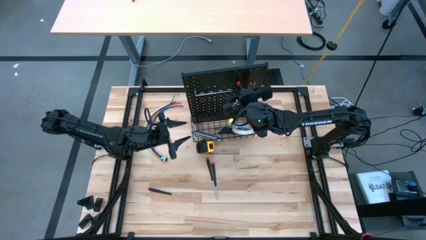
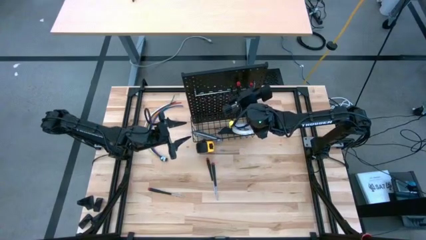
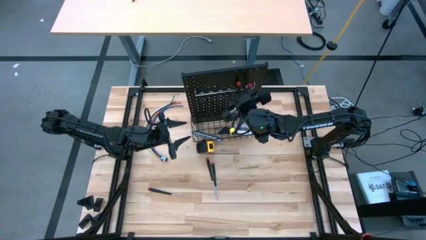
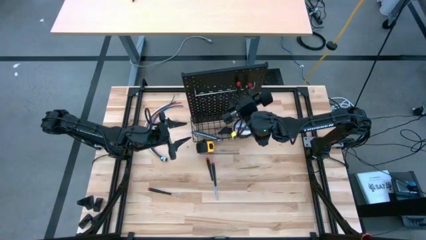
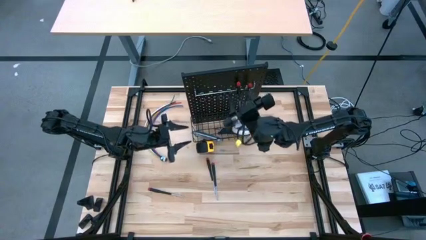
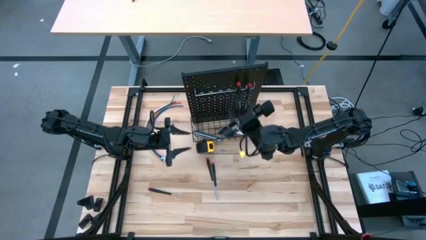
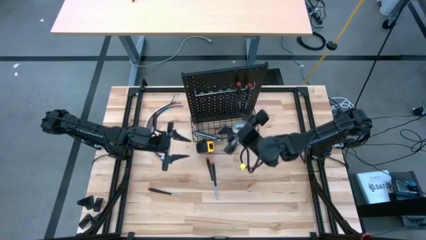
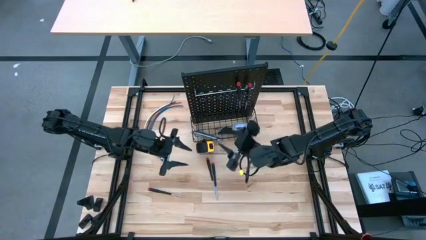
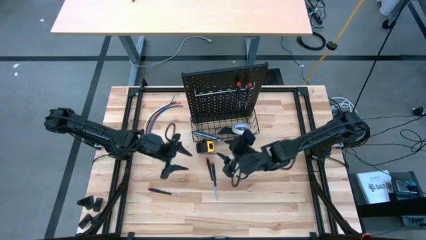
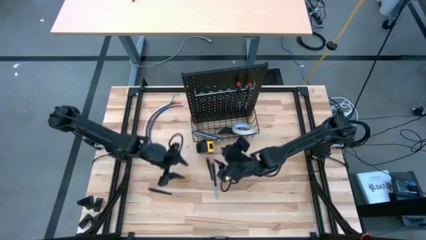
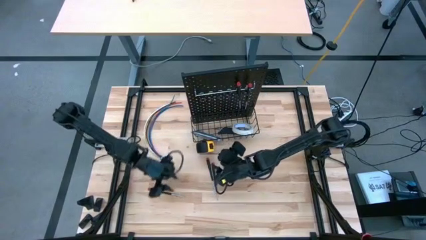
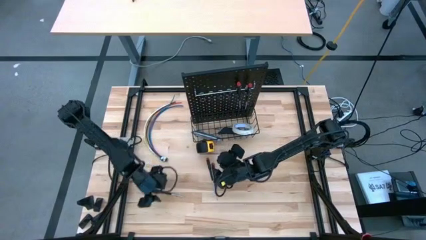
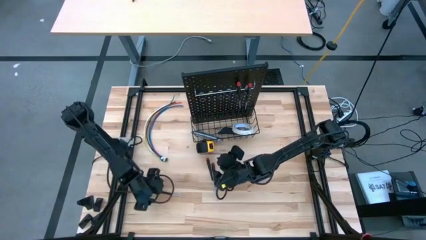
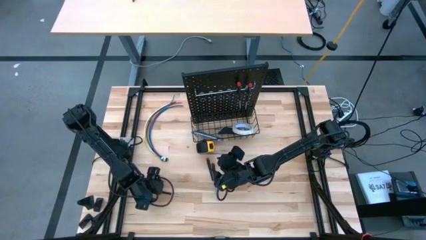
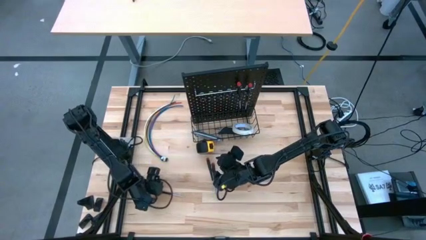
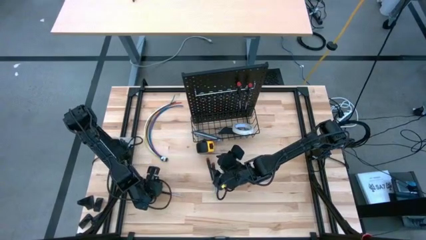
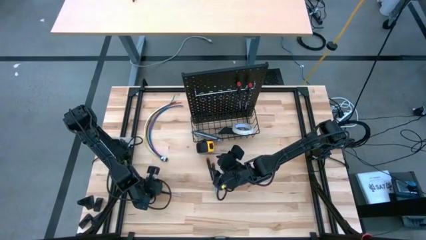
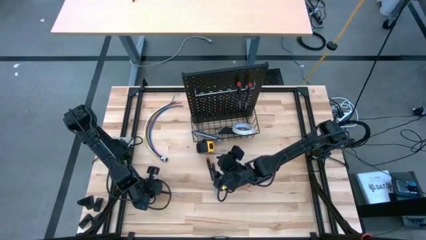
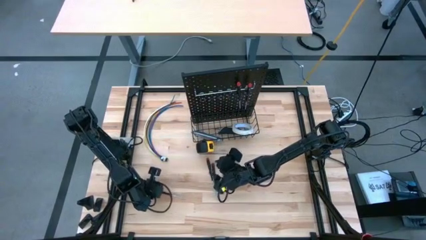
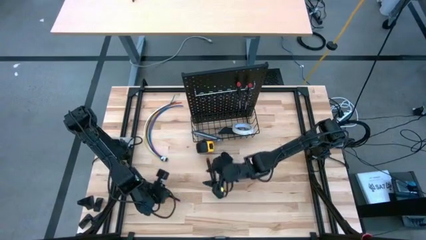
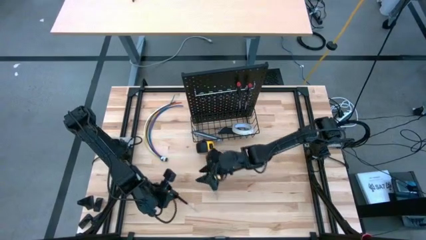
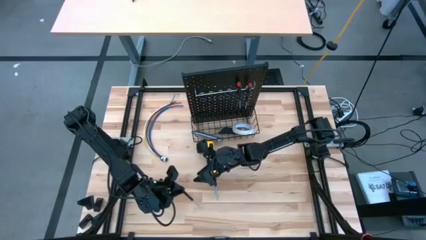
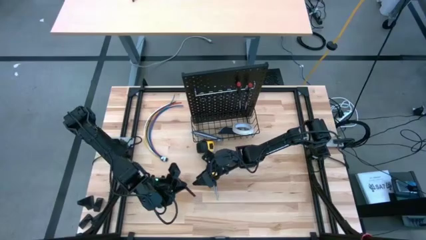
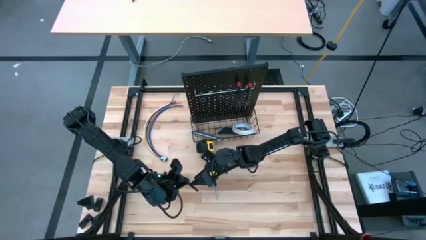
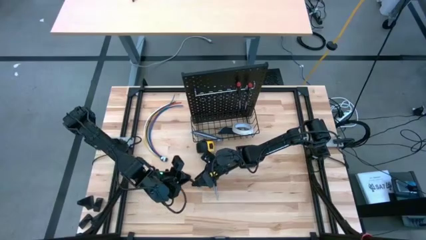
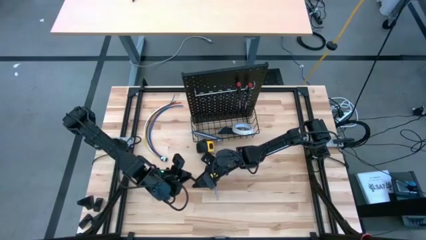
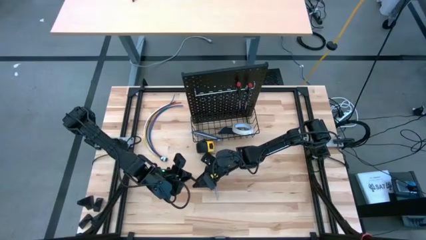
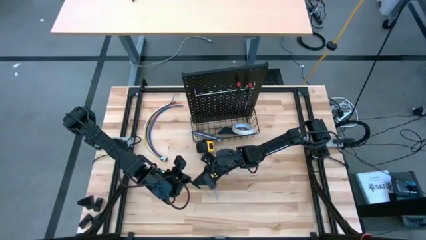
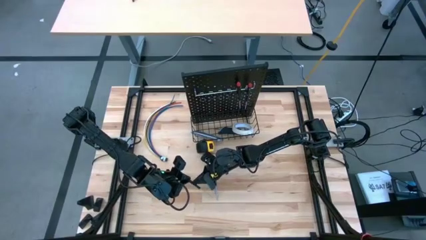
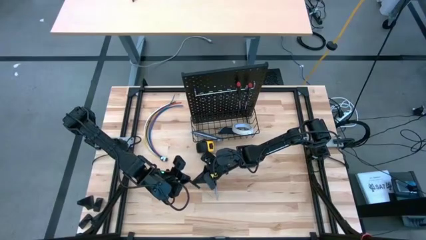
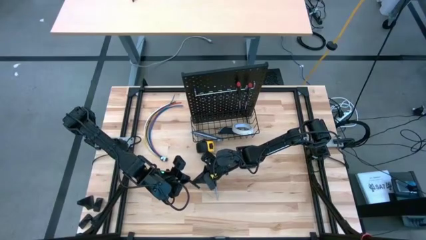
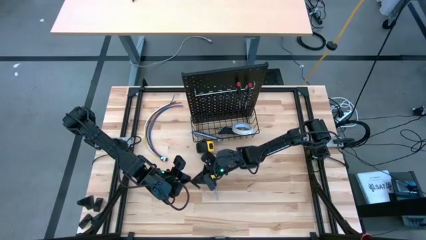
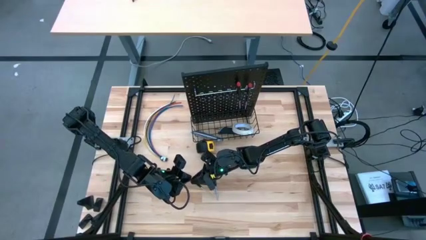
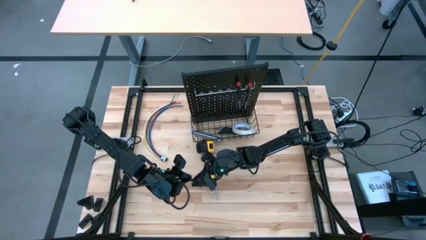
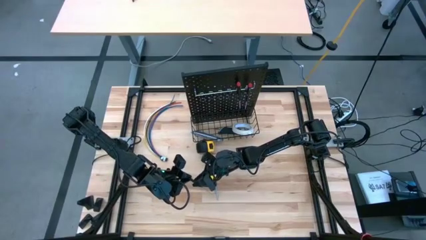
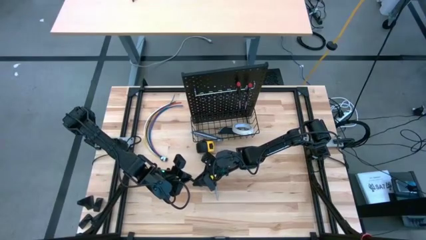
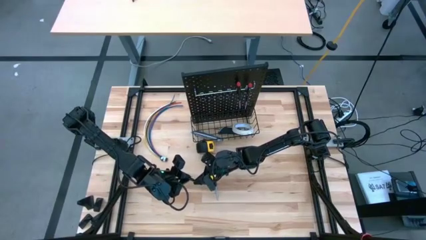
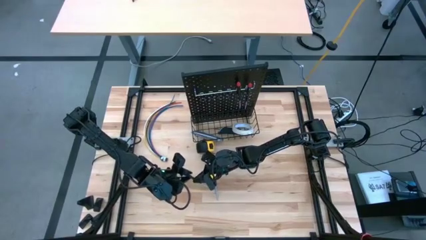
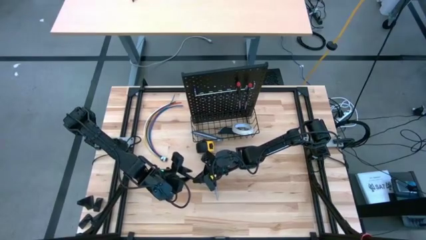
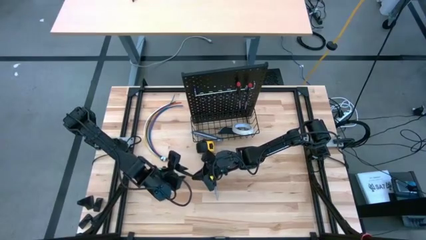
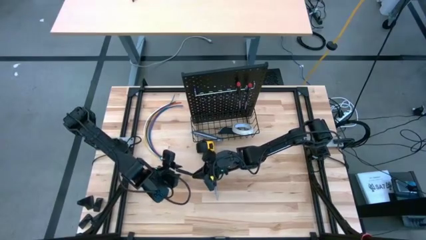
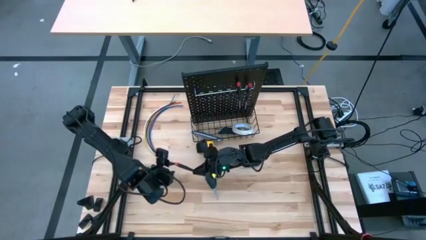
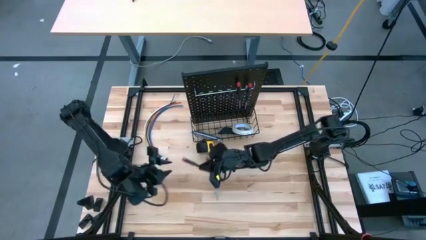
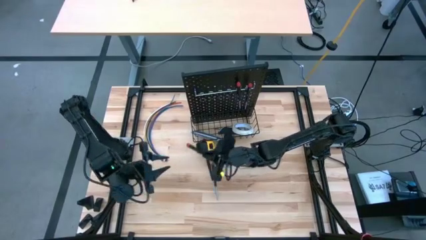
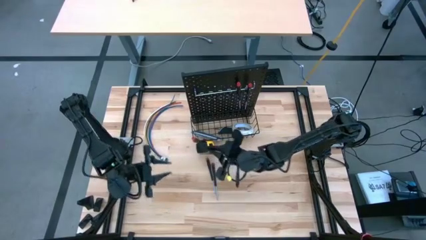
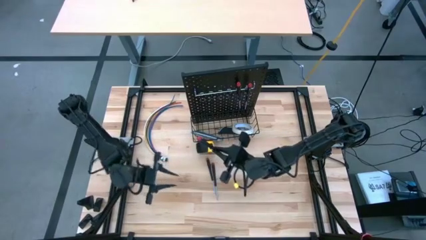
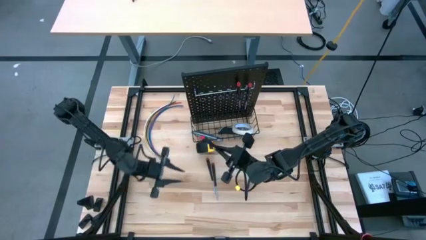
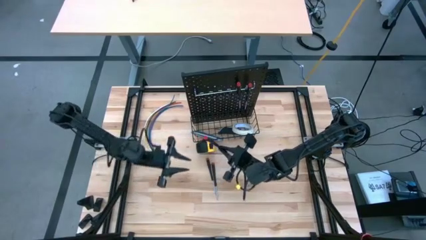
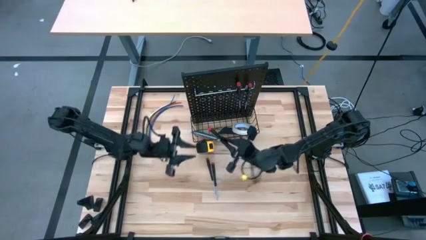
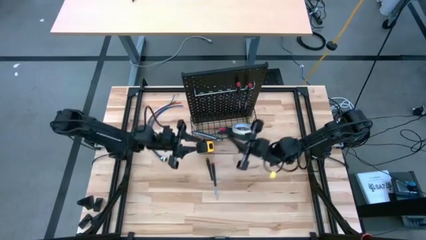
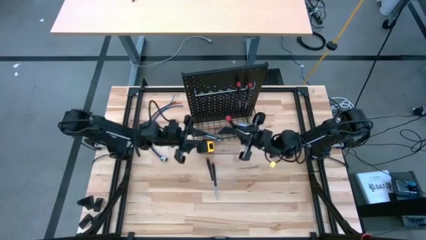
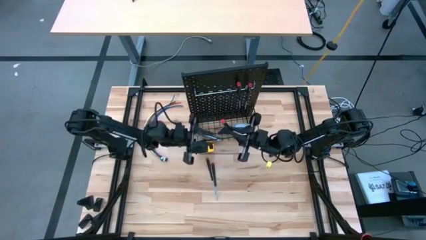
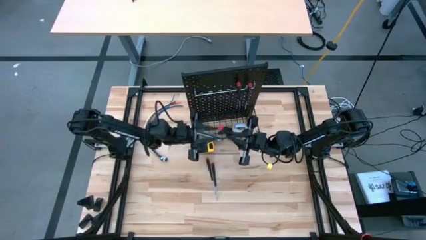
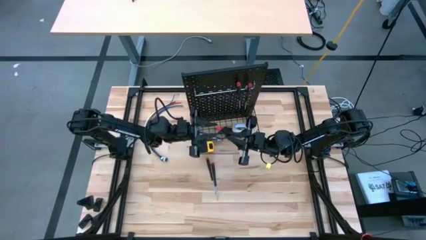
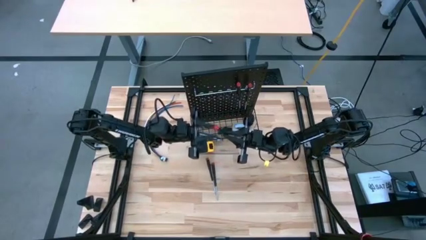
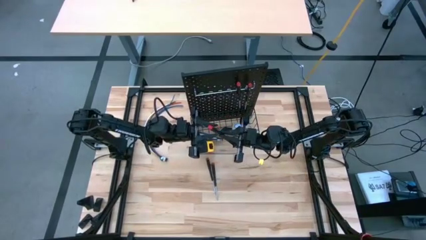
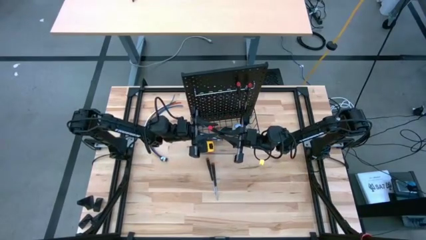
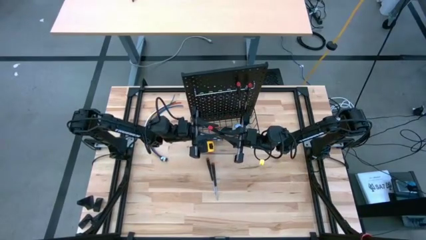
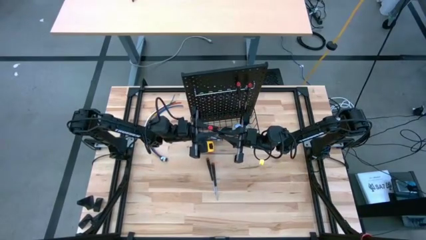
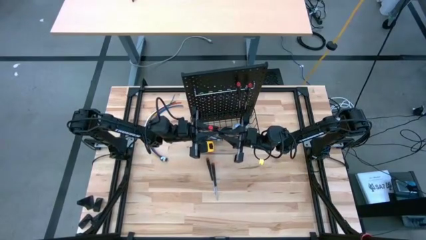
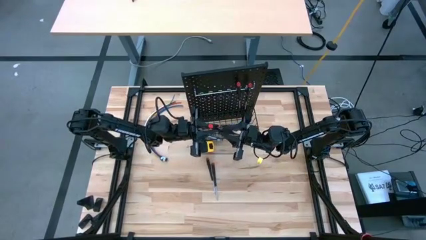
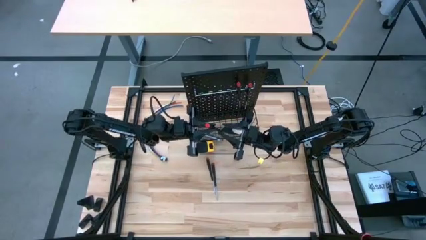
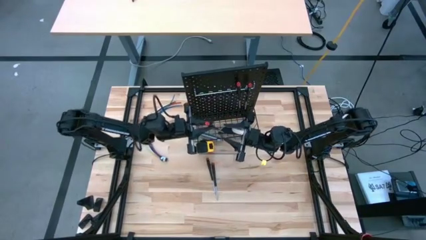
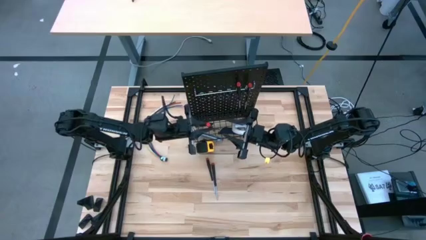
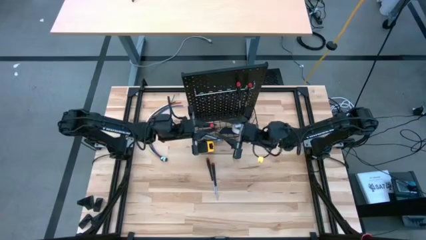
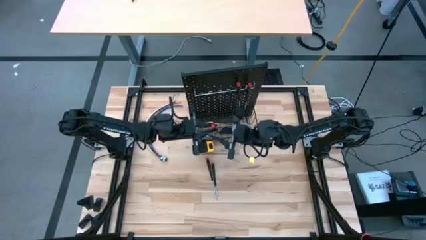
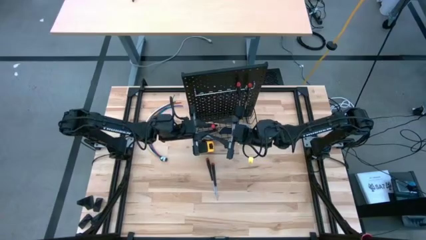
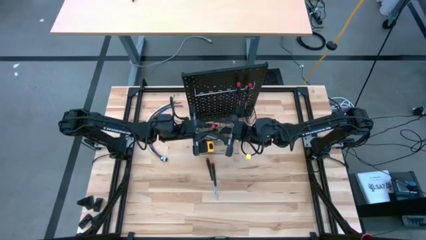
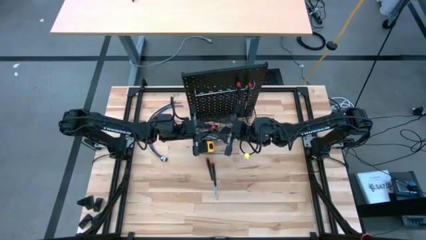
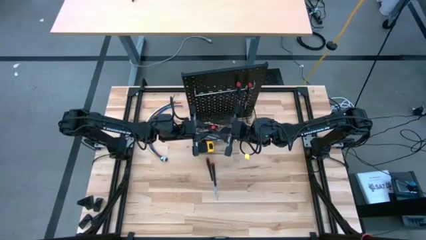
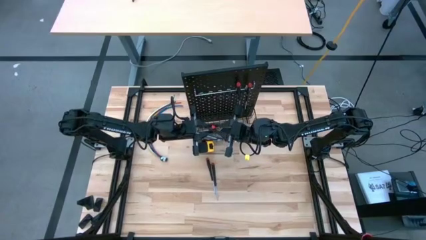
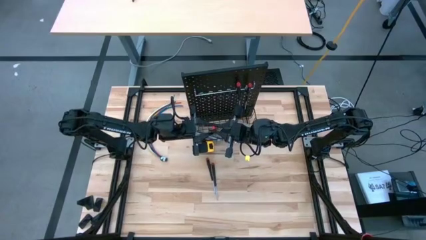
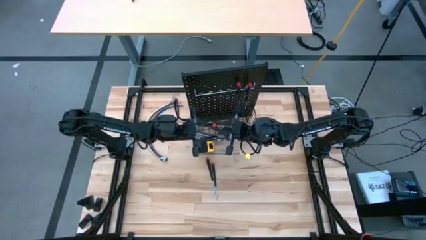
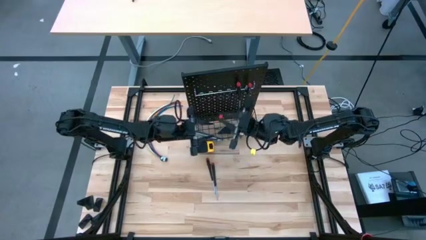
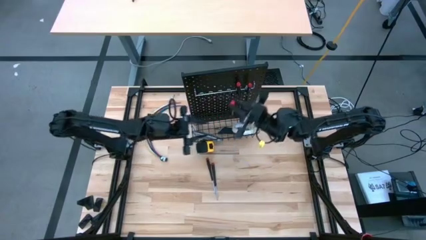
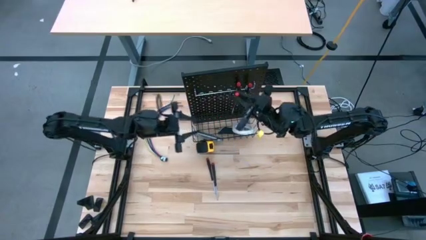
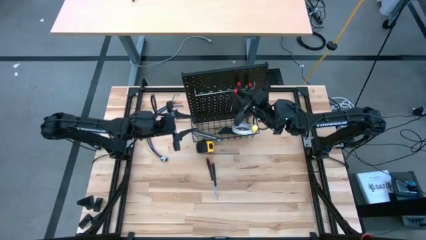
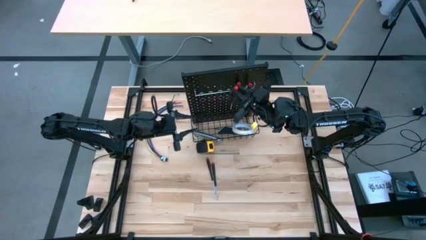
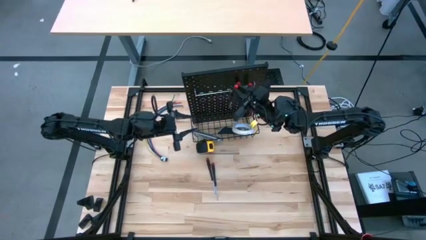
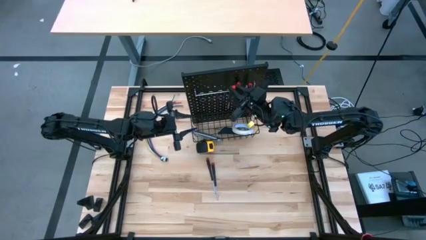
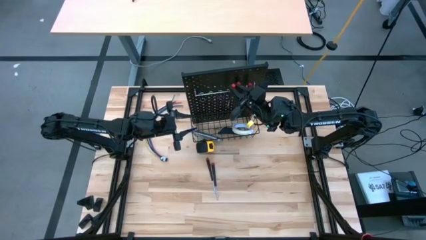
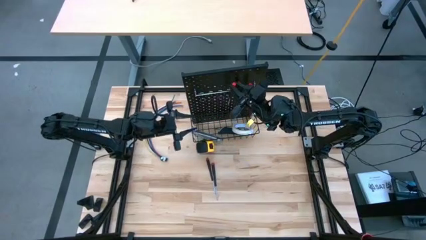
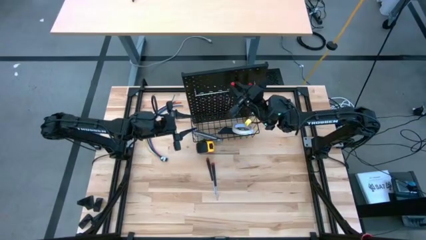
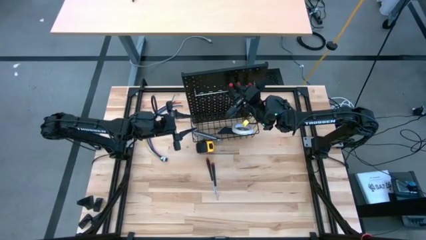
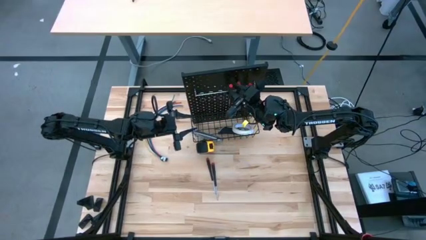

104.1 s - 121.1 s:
Task: Hang tools onto peg board
Hang the black screwdriver onto the pegboard
